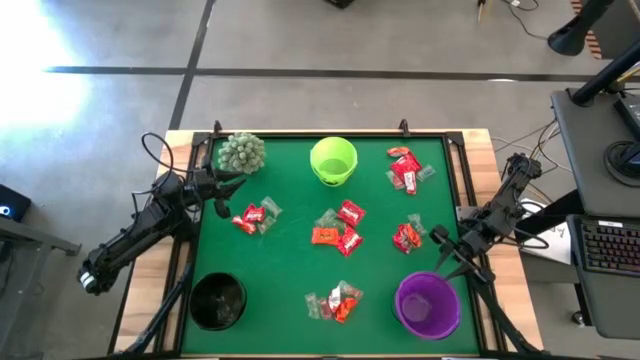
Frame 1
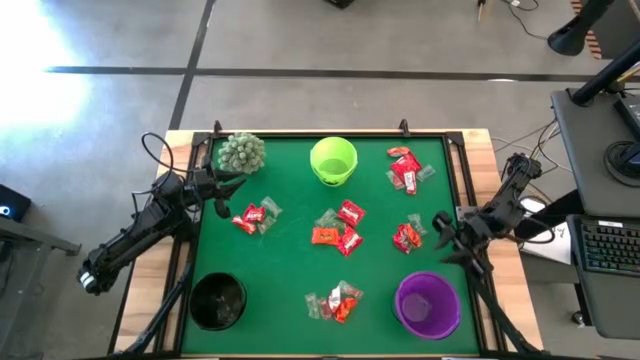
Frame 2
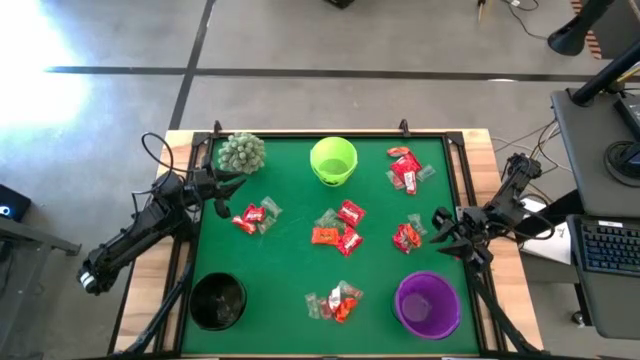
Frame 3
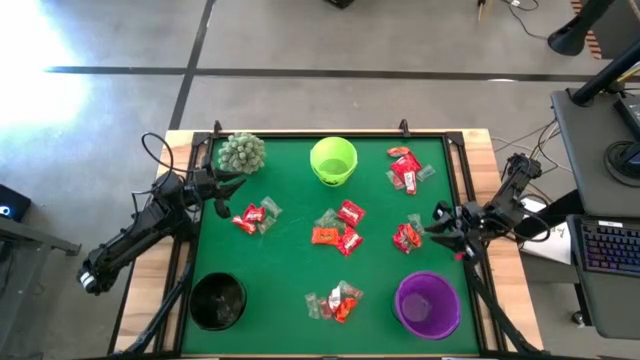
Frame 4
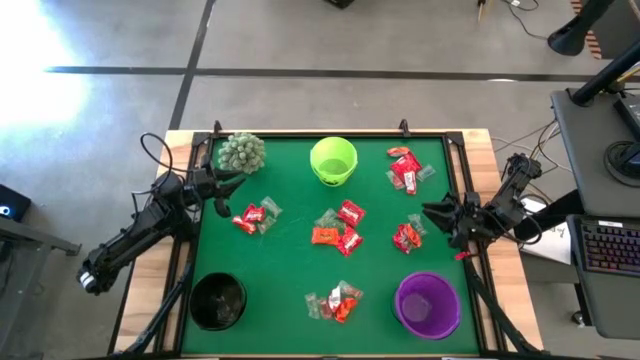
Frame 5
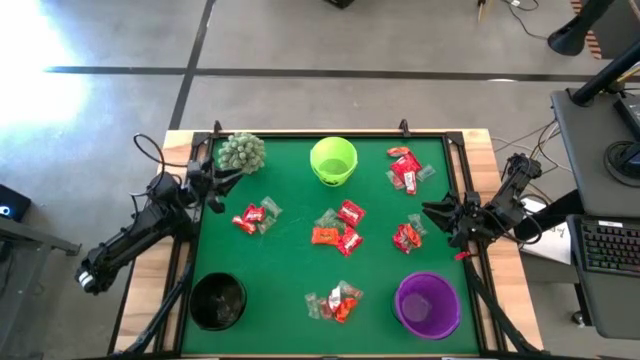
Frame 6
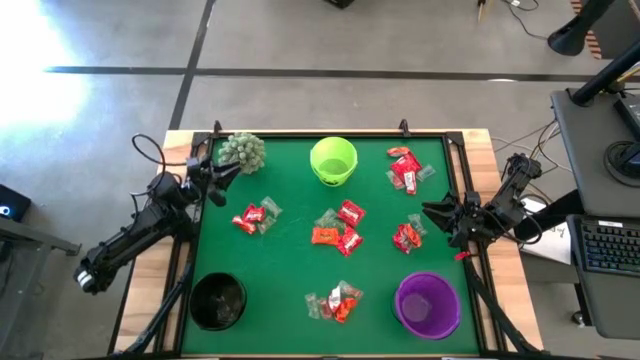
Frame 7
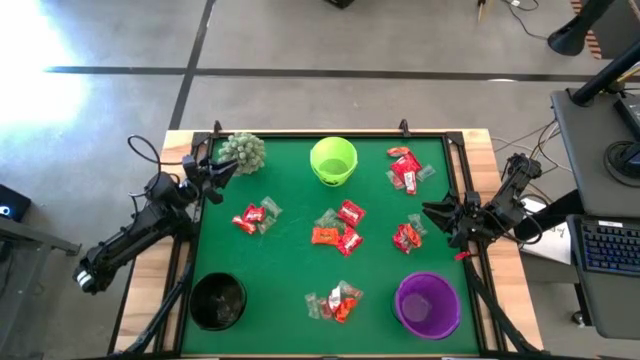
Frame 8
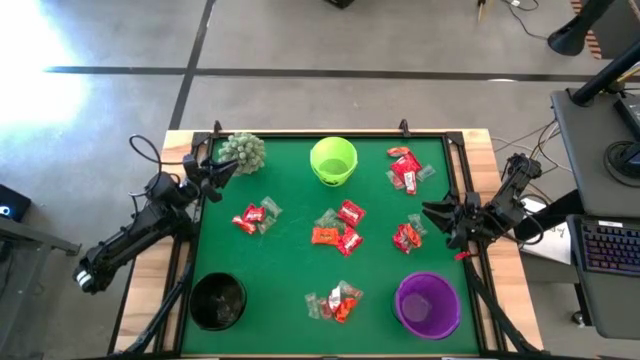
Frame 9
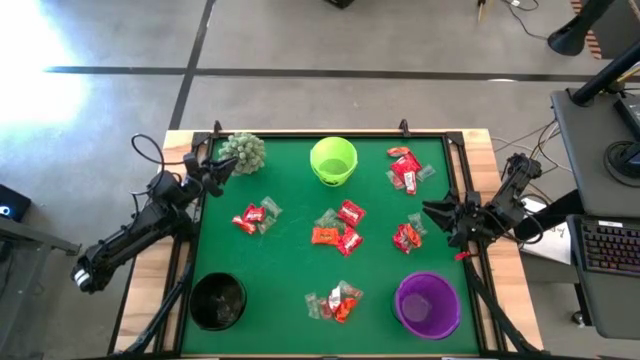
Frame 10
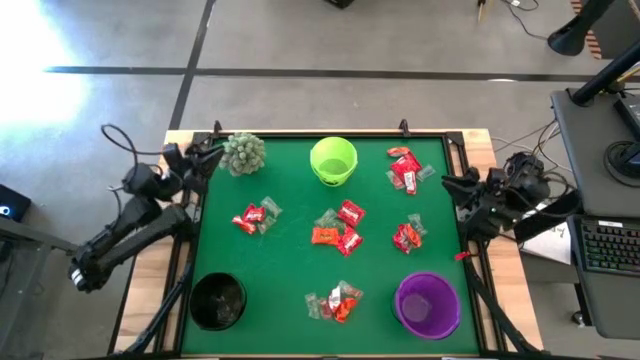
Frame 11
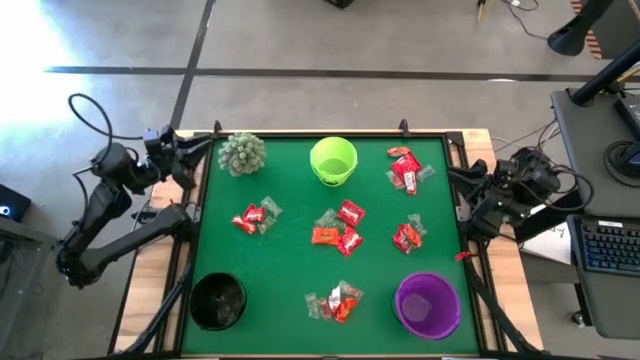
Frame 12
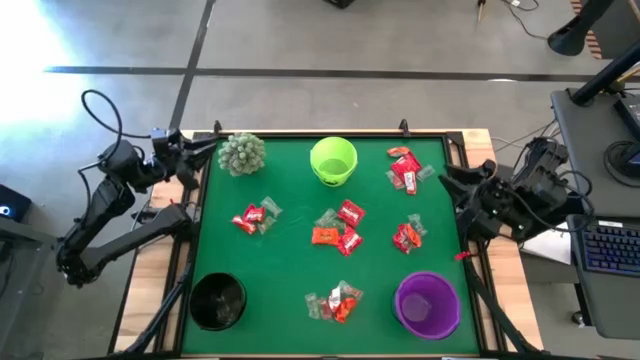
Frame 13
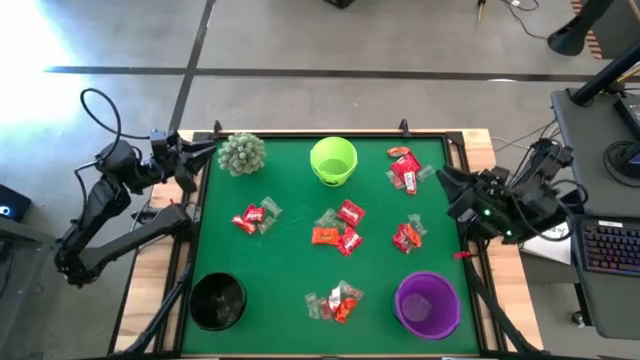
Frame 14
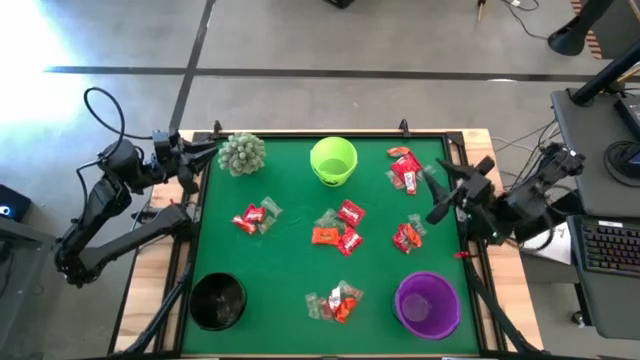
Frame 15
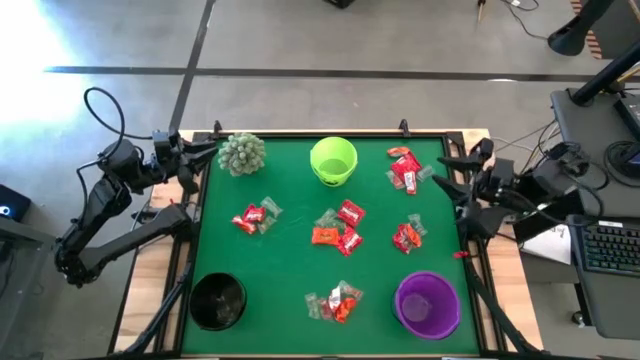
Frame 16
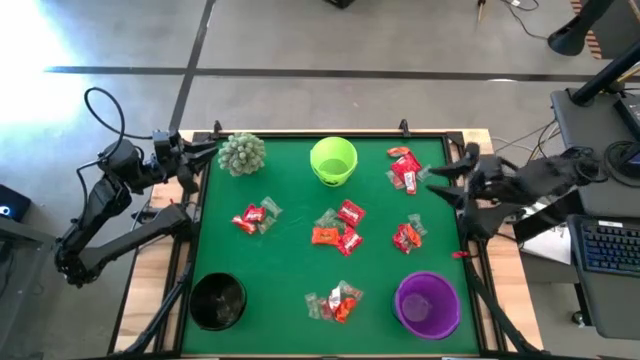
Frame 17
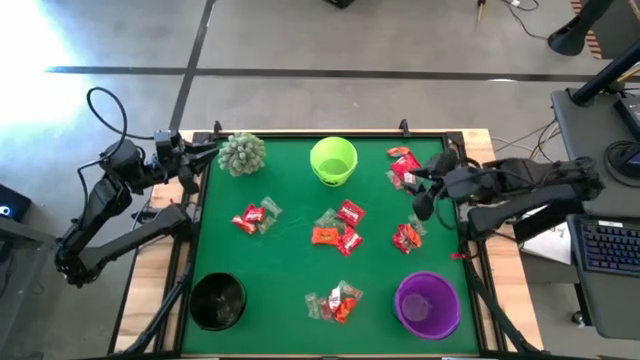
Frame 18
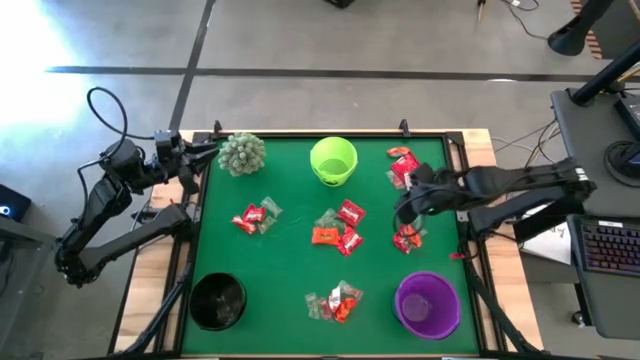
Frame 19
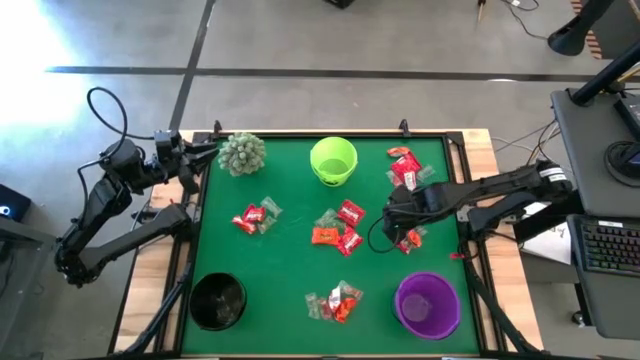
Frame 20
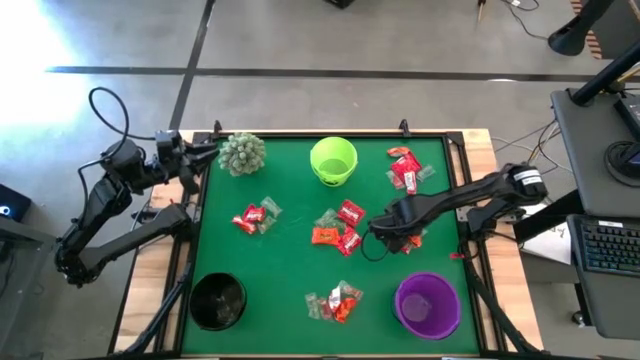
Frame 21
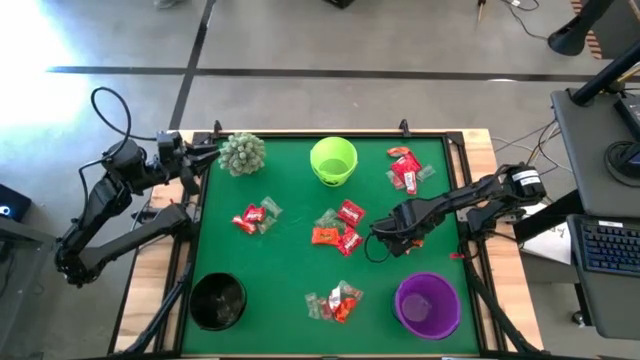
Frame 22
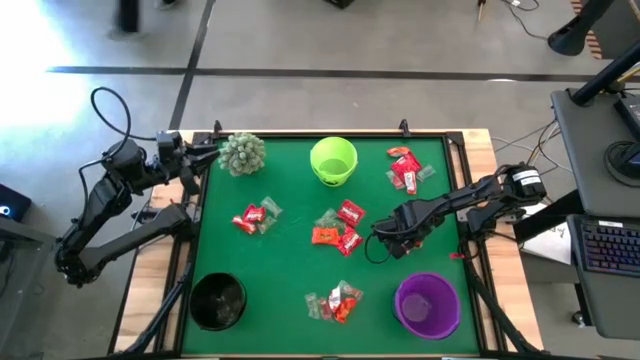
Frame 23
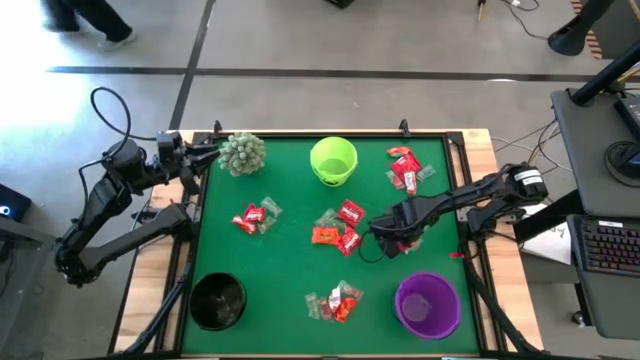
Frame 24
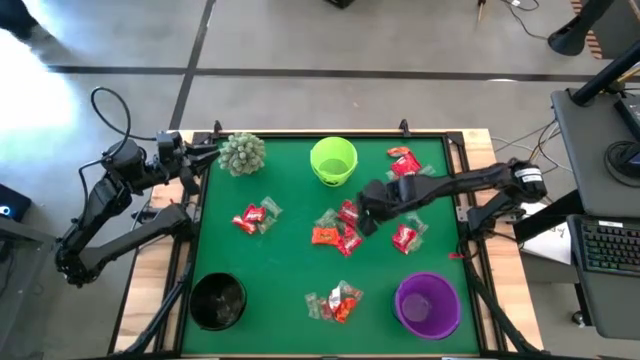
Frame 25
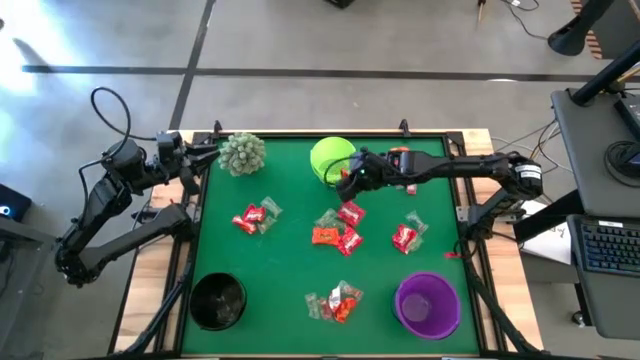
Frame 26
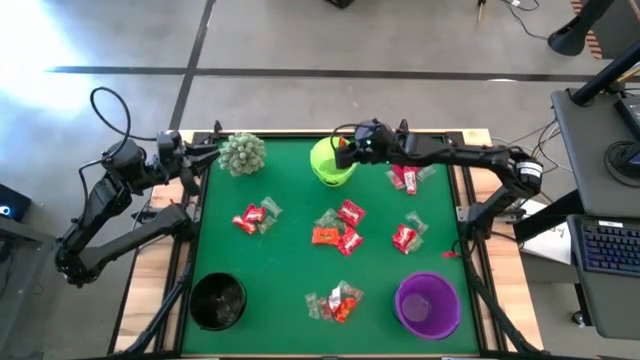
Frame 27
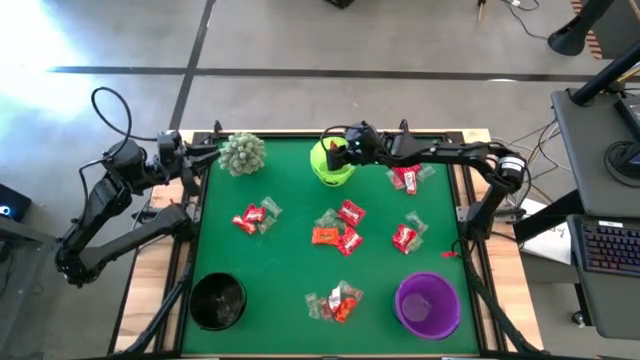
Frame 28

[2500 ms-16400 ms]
Task: Organize candy in baskets
Put the orange chocolate bar into the green bucket

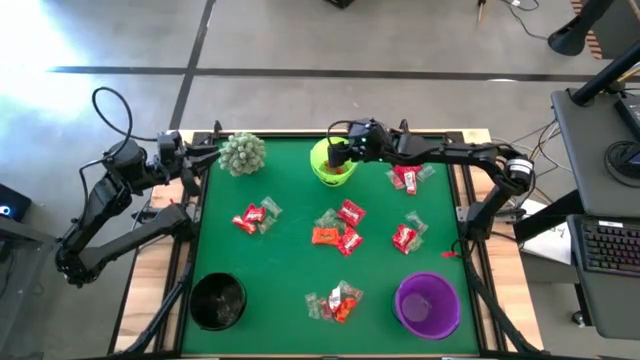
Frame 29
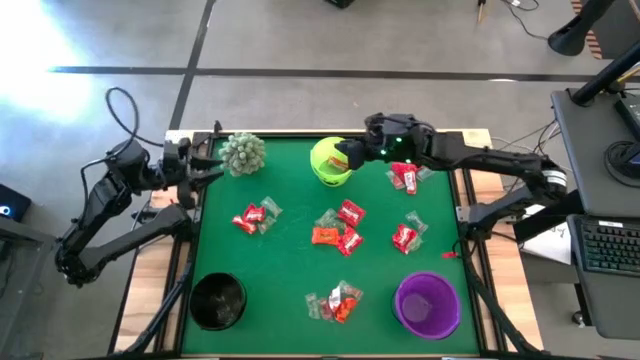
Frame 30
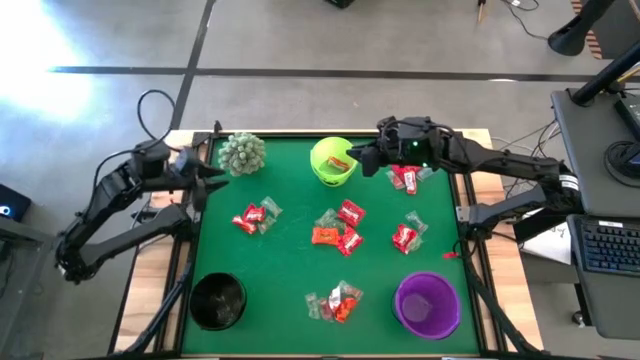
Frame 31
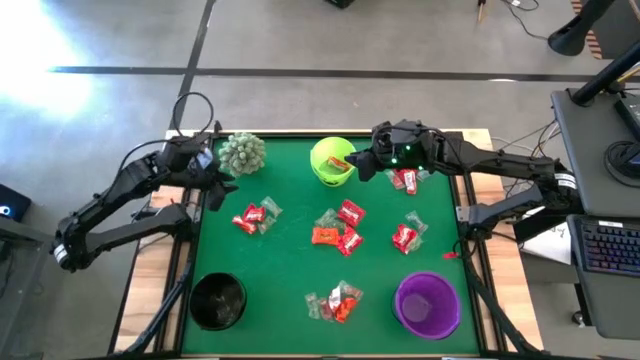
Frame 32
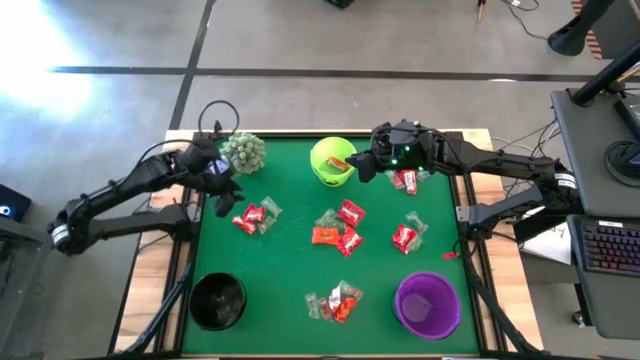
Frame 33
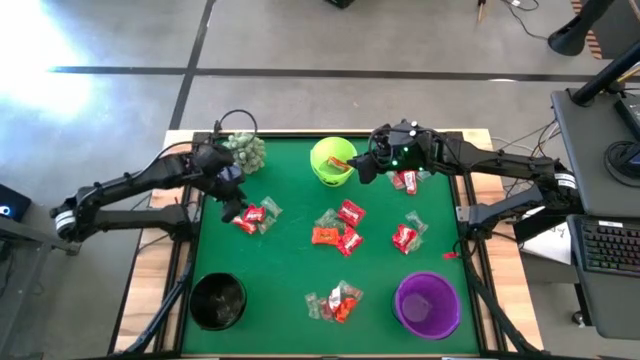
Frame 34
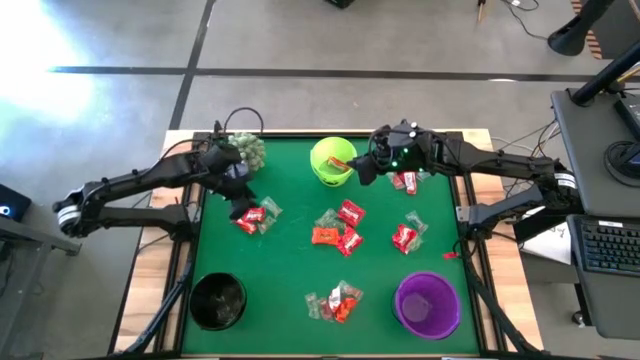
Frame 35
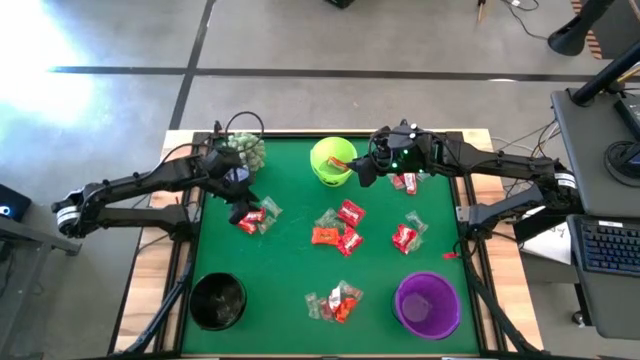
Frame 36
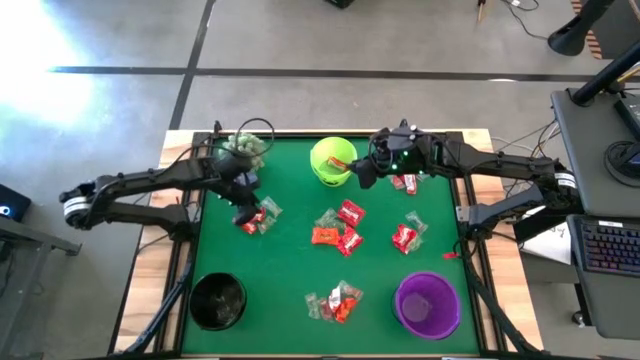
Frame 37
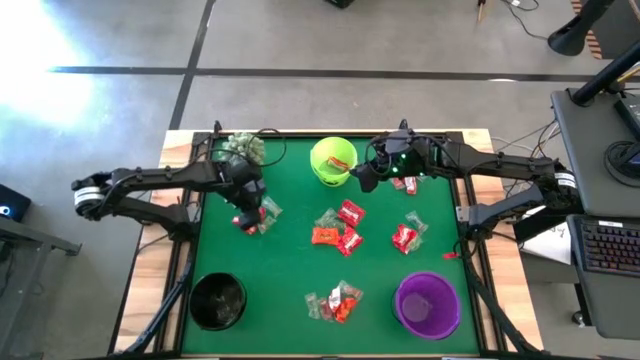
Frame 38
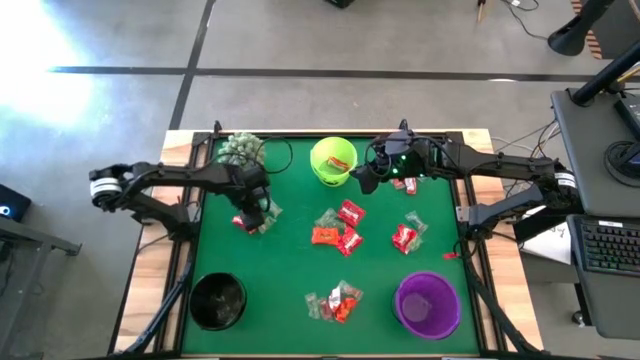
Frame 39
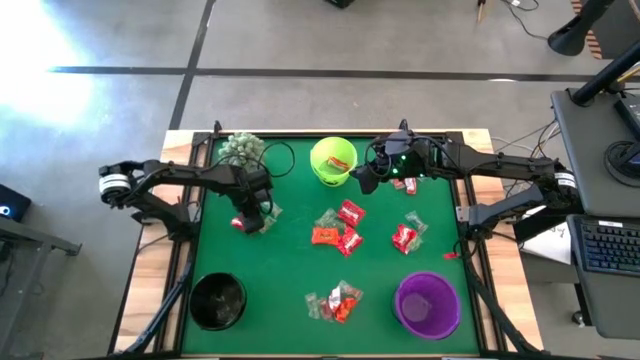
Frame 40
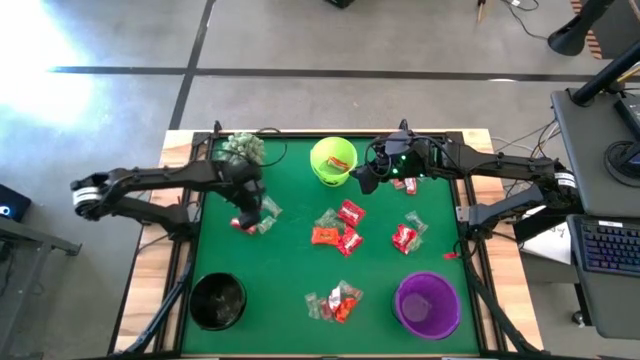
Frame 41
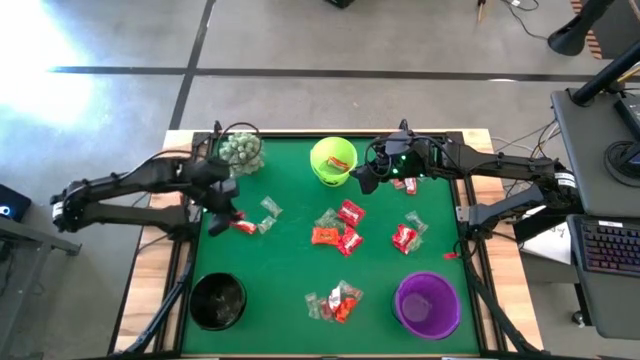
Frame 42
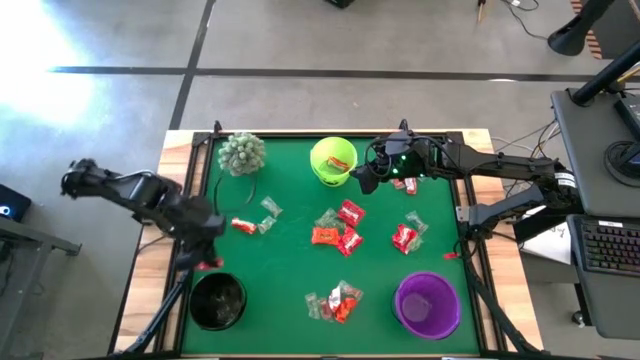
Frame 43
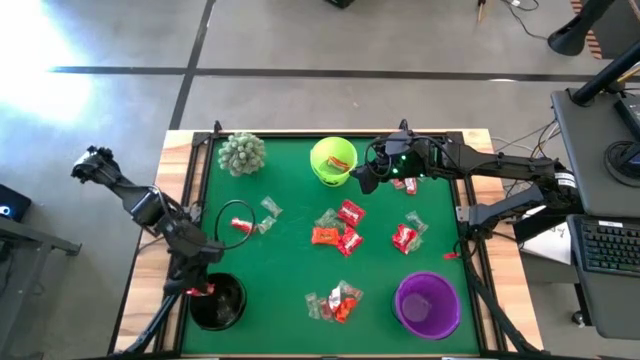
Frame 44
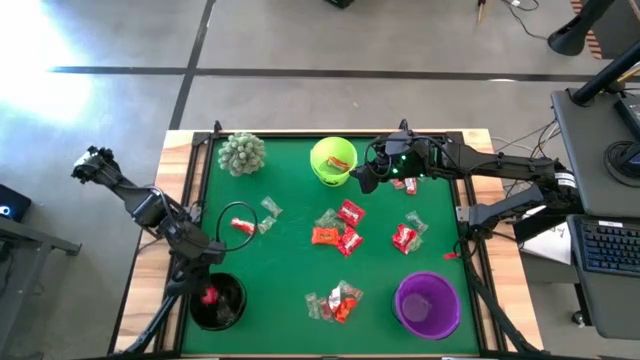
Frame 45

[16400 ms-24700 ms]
Put the red candy into the black bucket
